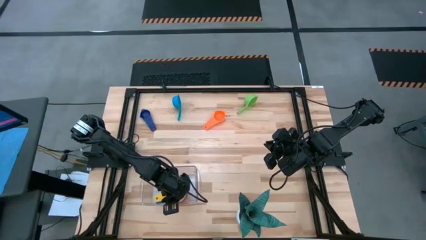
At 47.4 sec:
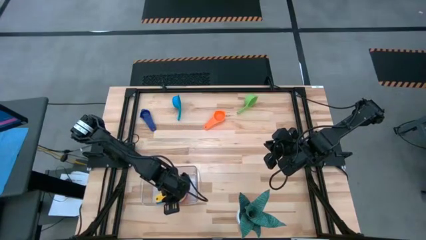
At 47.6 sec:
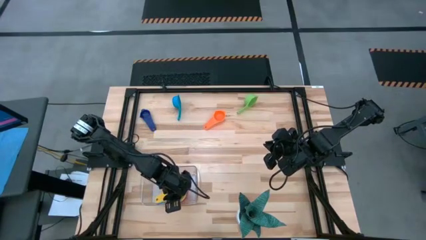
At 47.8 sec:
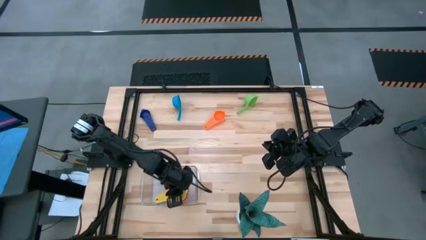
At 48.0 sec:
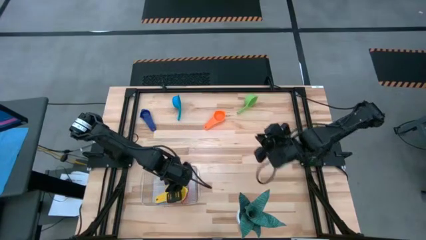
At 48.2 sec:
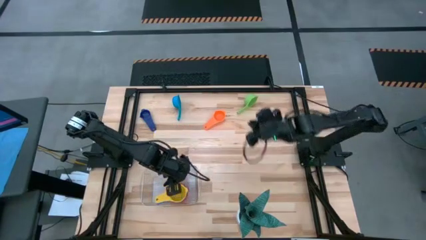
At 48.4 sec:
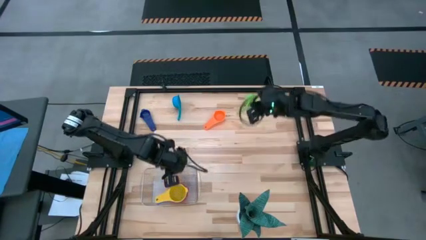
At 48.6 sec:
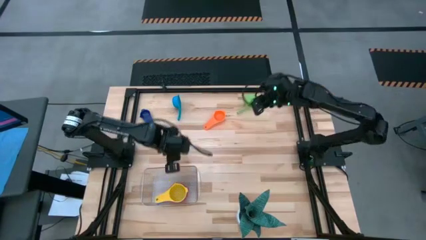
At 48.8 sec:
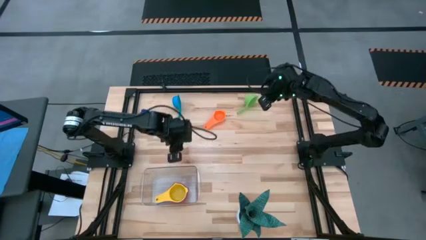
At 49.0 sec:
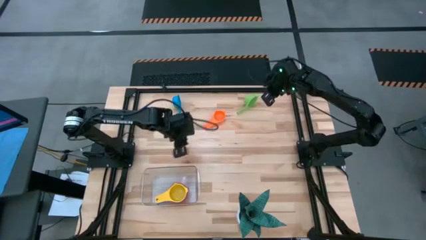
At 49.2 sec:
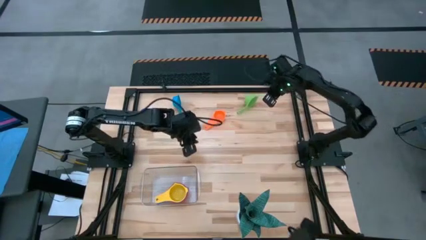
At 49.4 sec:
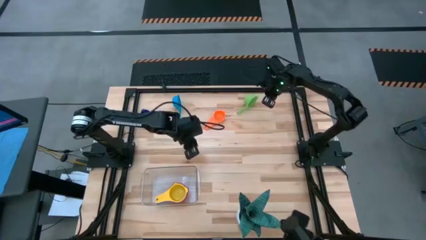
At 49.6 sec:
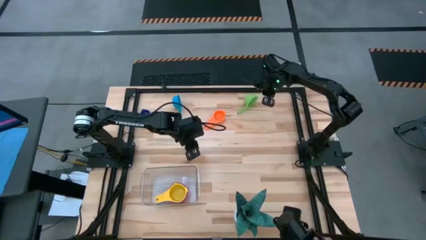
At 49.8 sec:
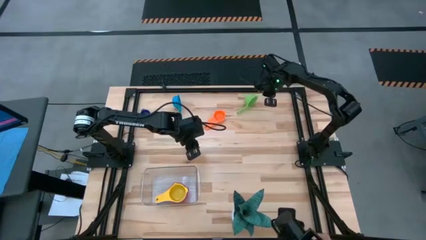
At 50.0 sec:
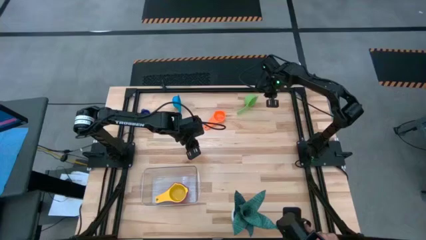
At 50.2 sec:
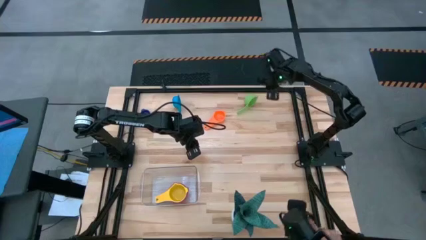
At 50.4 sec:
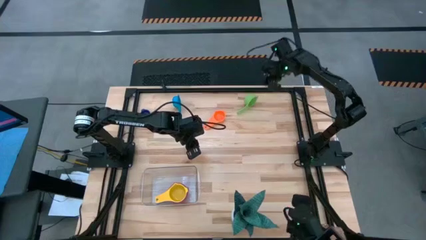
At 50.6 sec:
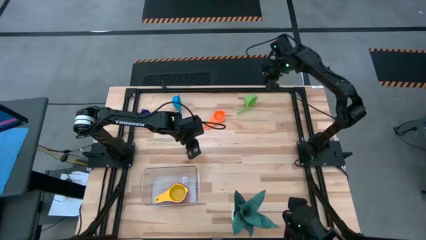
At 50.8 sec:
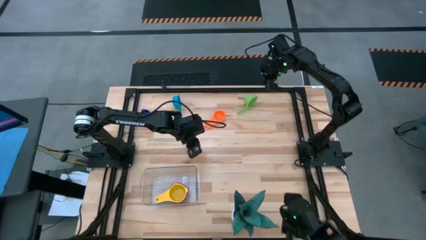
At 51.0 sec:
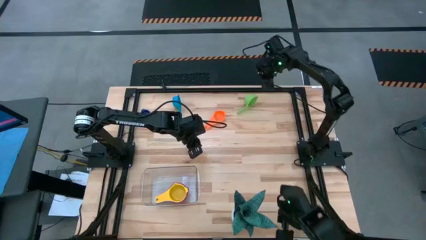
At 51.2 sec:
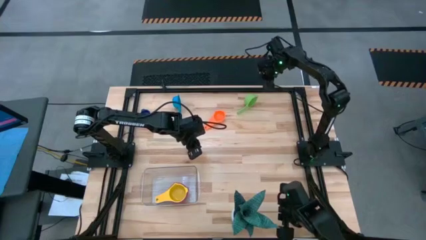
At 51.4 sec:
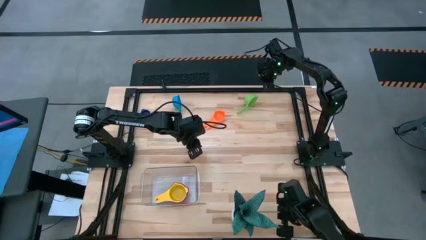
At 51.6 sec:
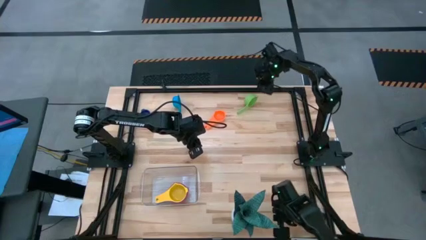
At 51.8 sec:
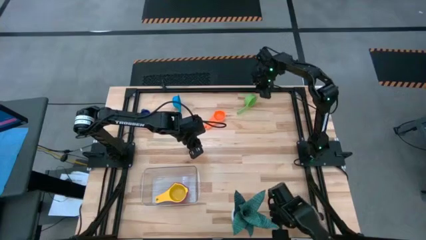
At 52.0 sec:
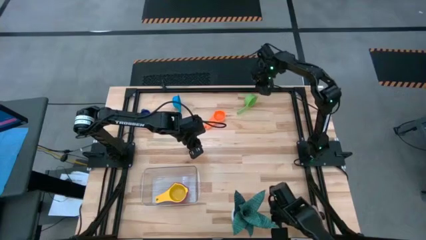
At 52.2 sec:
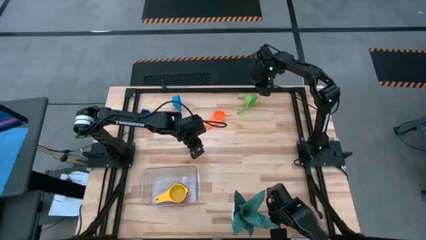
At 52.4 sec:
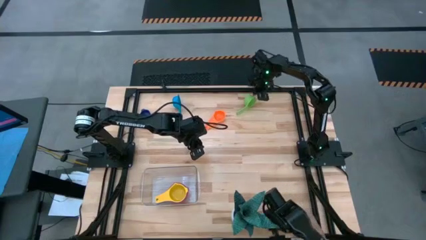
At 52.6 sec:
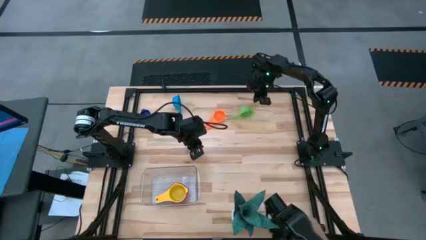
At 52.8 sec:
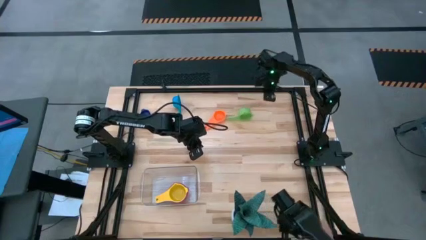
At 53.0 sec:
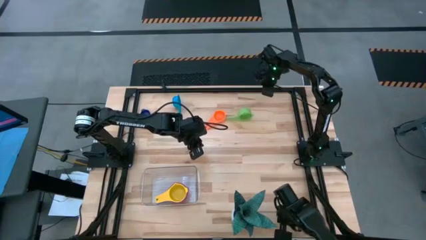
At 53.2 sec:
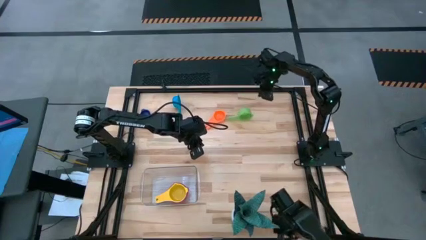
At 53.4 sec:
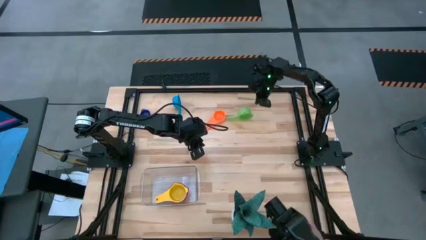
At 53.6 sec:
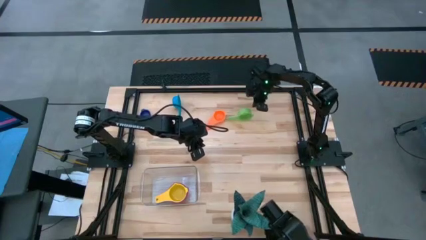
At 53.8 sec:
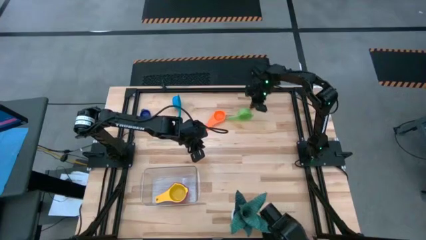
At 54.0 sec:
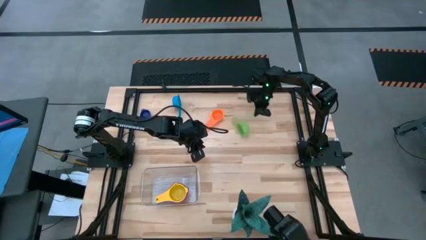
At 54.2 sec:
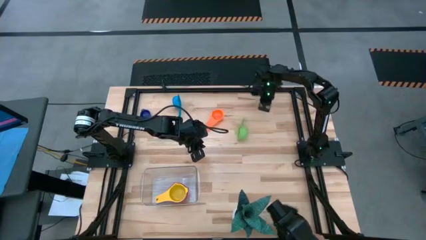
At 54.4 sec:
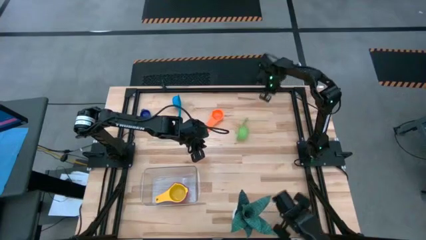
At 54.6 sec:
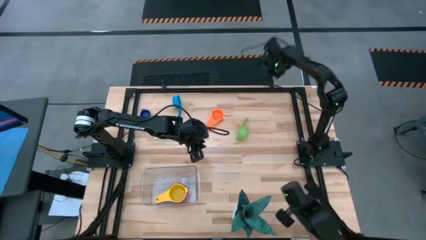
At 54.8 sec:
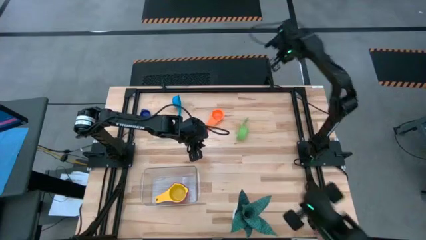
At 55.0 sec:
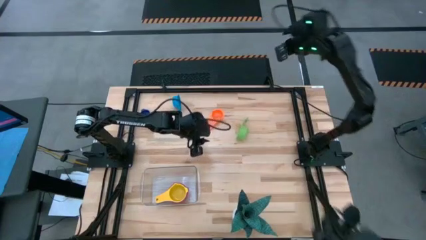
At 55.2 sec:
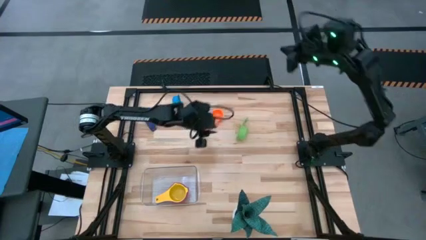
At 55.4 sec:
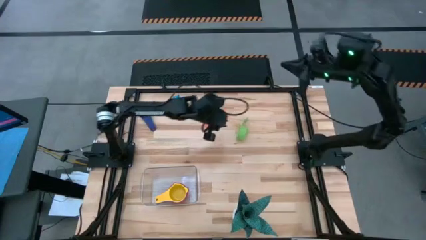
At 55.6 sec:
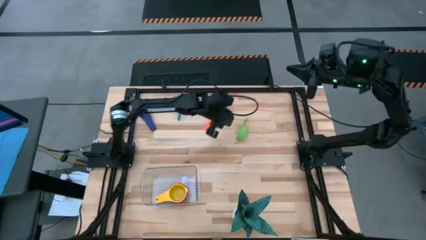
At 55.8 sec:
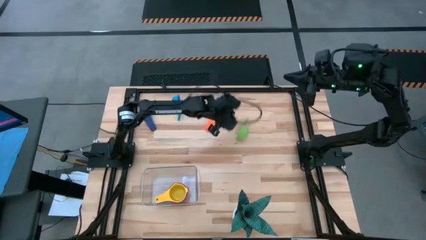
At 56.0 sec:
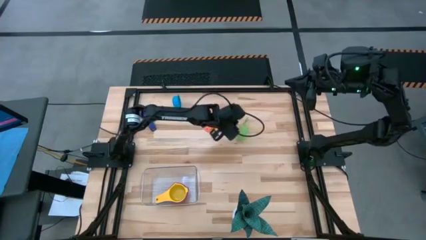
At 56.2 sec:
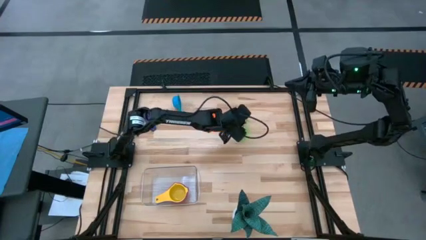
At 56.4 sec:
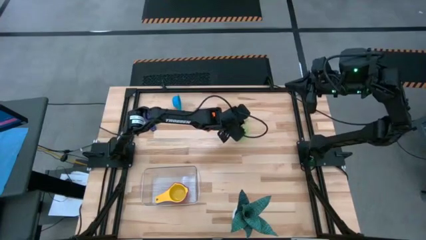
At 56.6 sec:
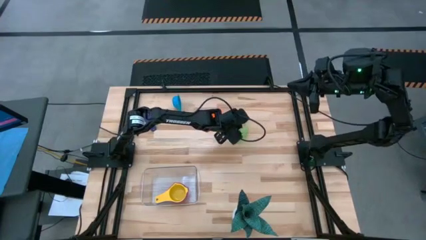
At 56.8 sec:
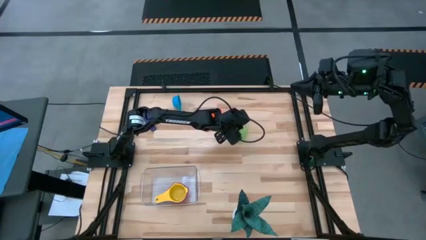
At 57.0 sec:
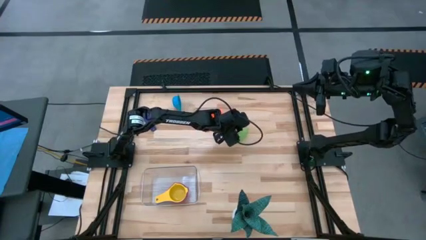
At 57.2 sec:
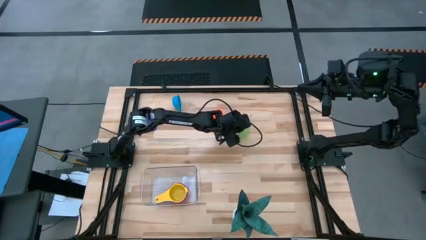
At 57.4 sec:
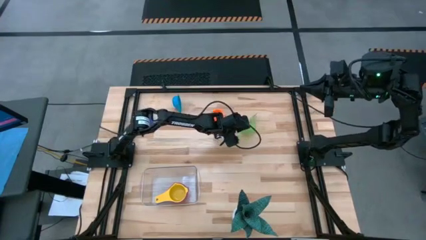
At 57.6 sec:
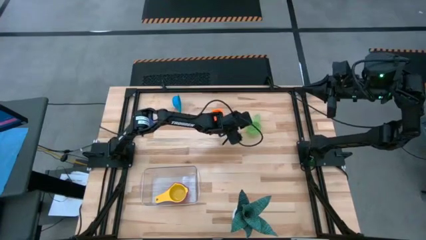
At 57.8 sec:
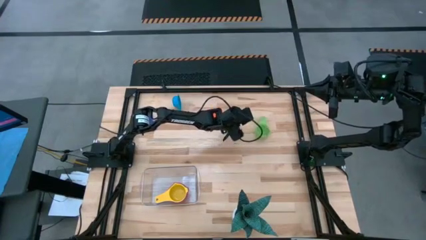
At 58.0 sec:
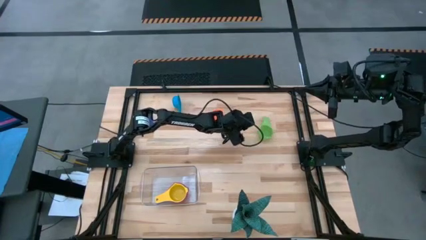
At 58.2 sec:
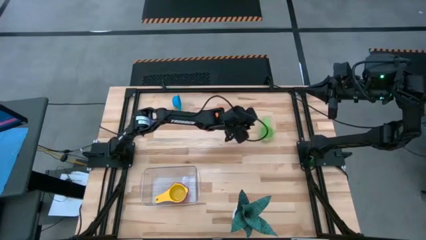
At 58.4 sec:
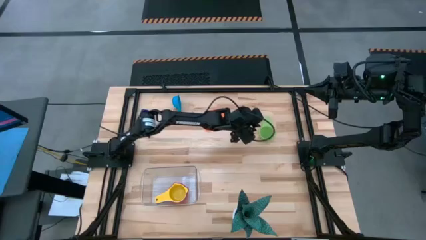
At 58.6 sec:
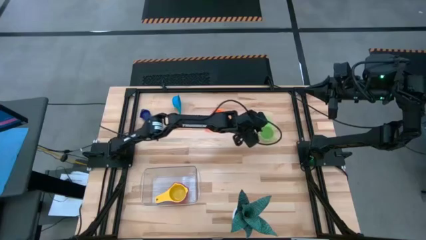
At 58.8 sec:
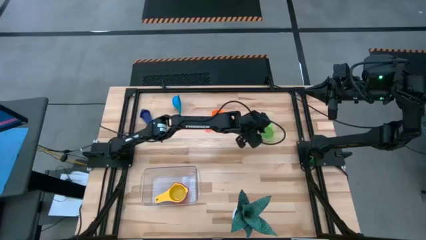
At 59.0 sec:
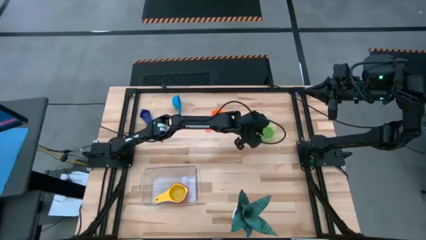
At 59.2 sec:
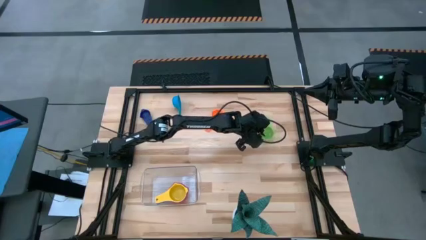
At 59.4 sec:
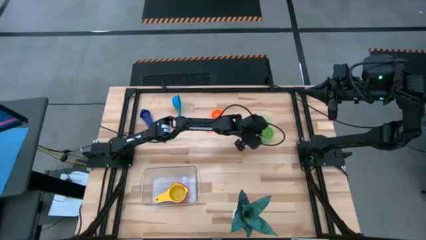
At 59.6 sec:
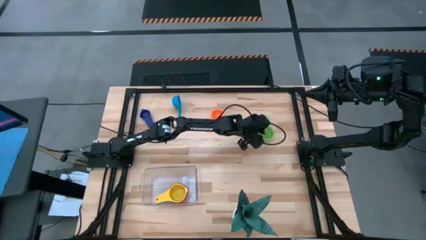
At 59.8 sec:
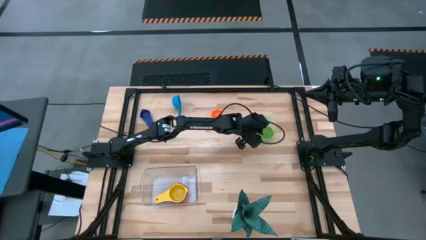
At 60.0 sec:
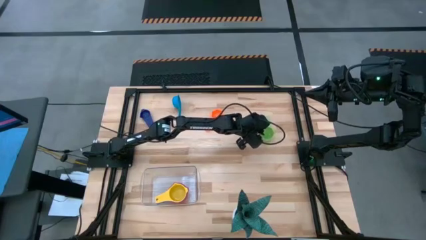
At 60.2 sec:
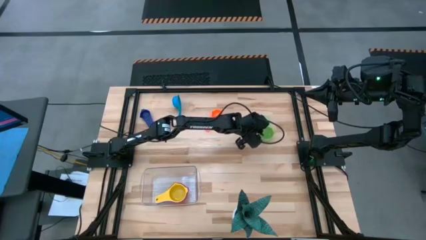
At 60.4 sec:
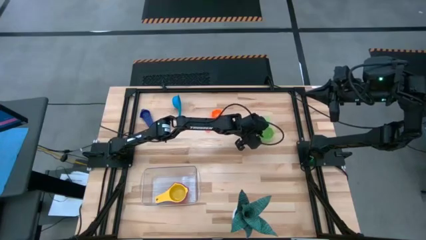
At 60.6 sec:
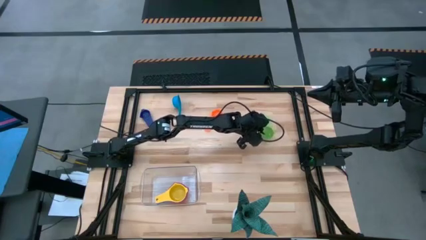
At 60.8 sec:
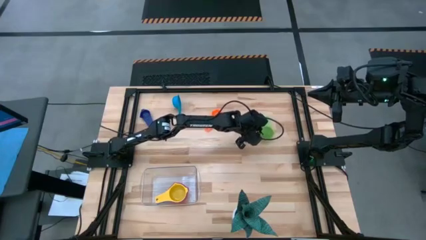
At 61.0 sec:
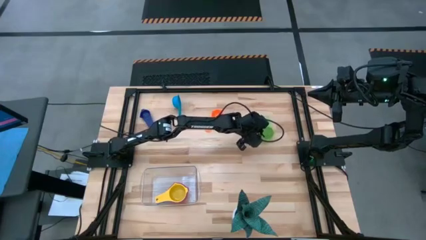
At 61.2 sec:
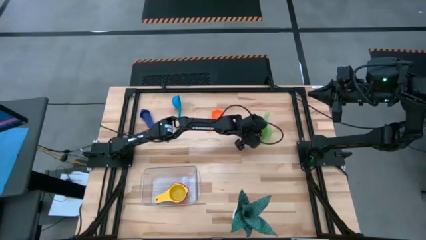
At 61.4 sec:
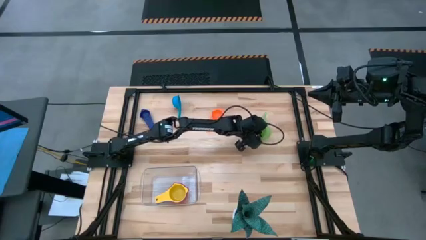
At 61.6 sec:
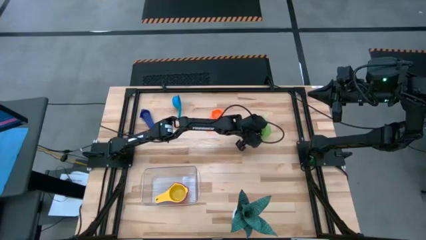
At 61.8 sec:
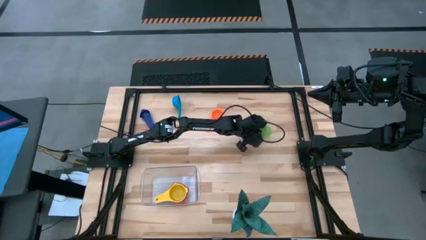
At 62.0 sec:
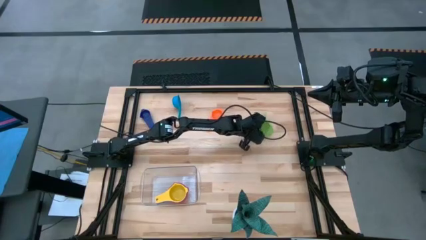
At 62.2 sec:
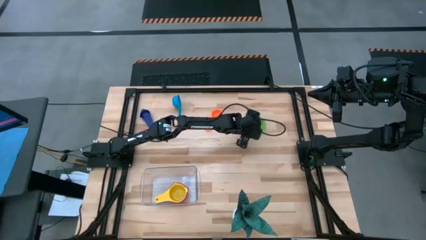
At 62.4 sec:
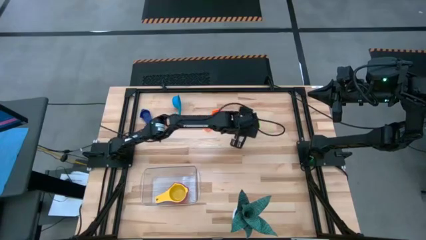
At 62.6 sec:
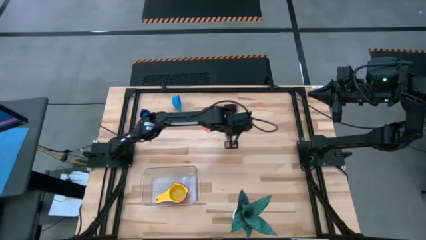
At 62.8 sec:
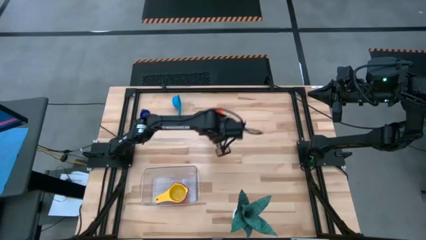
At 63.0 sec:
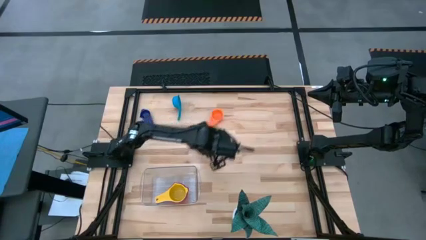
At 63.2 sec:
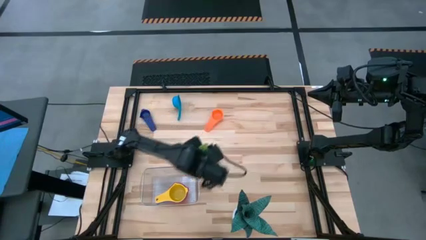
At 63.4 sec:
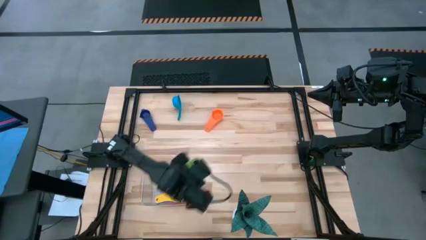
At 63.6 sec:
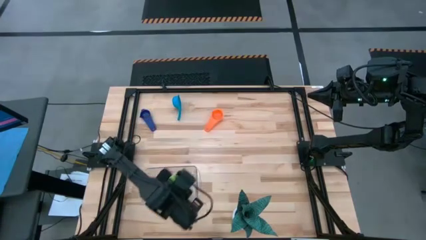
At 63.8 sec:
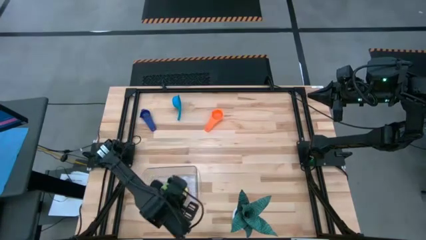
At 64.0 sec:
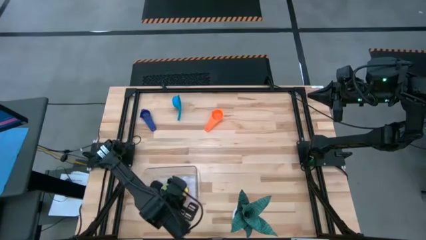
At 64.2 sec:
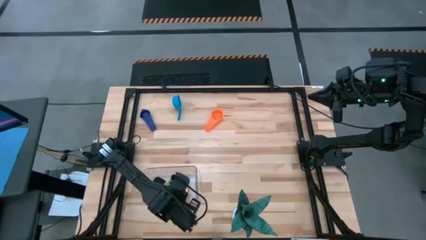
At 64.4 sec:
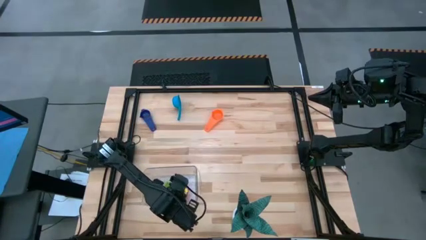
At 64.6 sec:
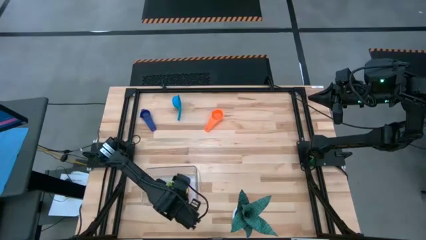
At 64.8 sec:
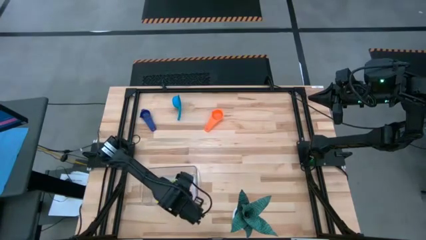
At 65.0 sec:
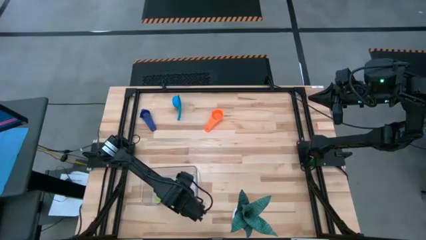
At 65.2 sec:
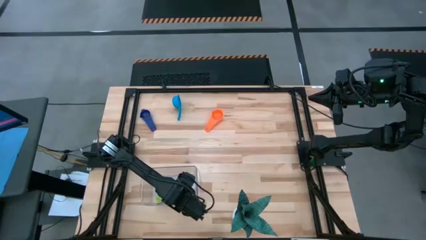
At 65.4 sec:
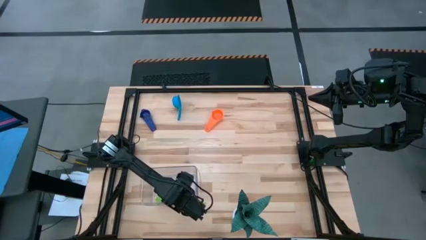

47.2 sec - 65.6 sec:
Task: Nest measuring cups in basket
Stack the green measuring cup on top of the yellow measuring cup in the transparent bin
